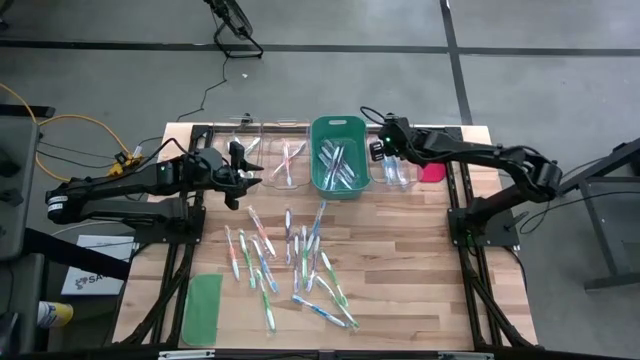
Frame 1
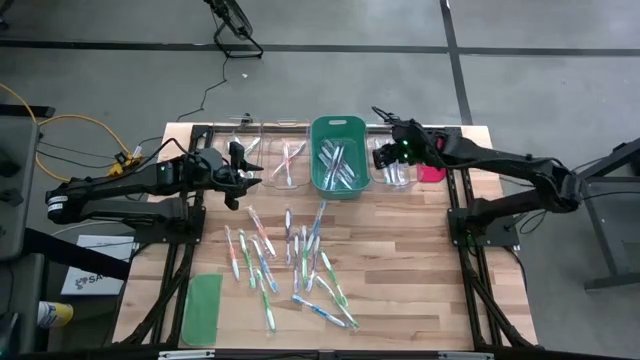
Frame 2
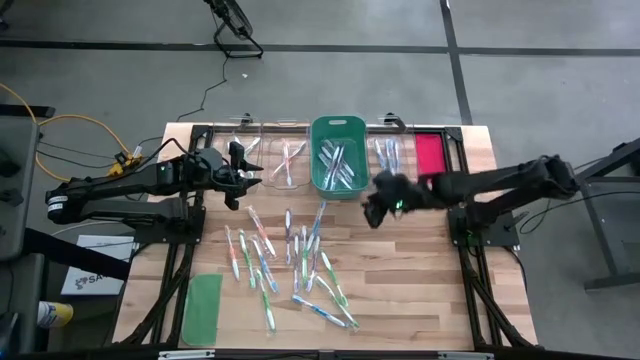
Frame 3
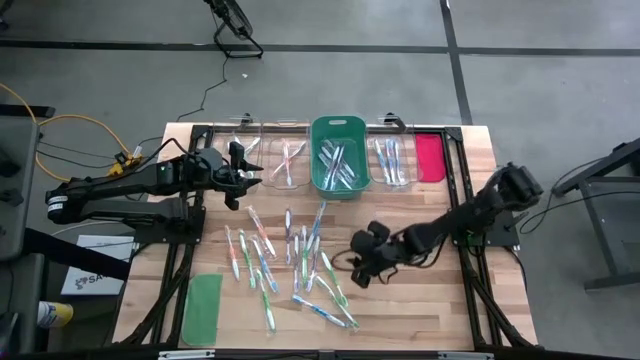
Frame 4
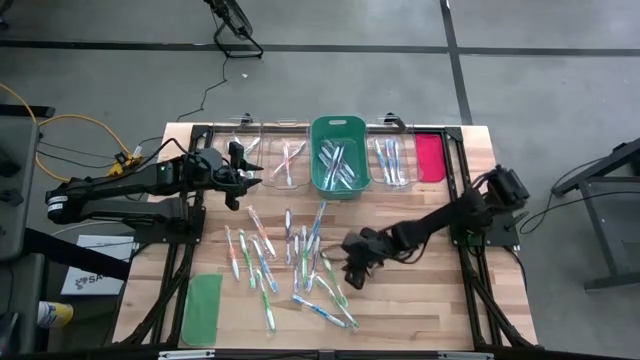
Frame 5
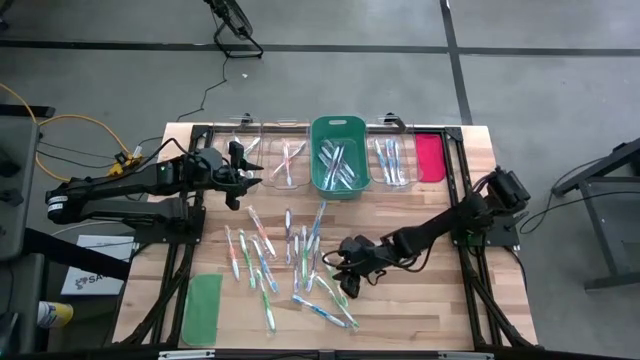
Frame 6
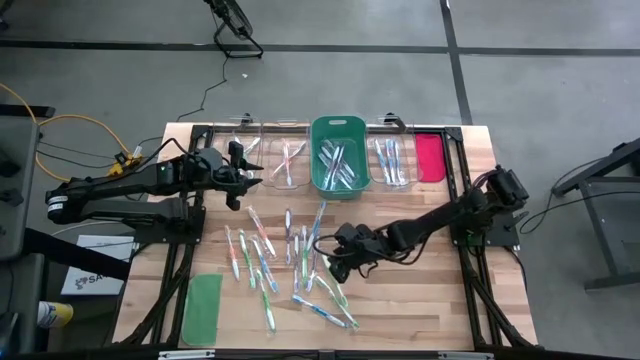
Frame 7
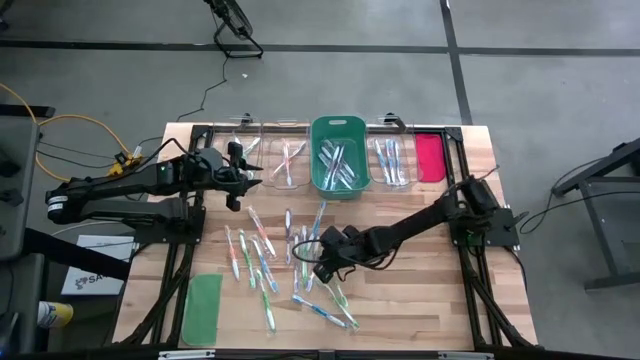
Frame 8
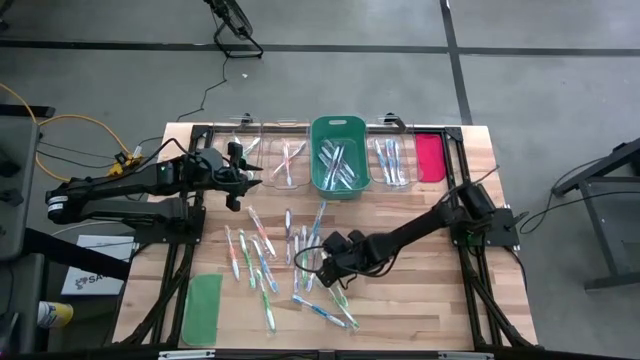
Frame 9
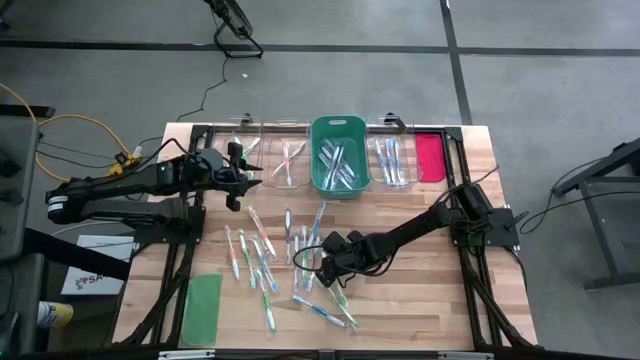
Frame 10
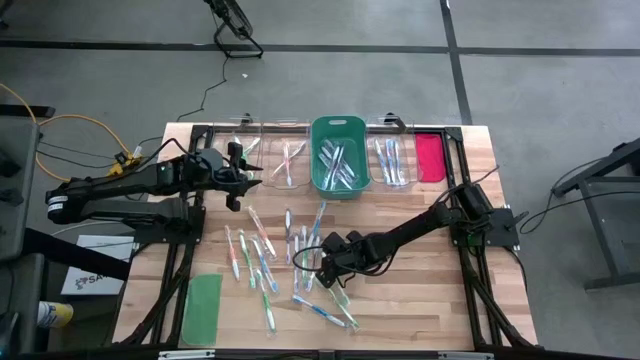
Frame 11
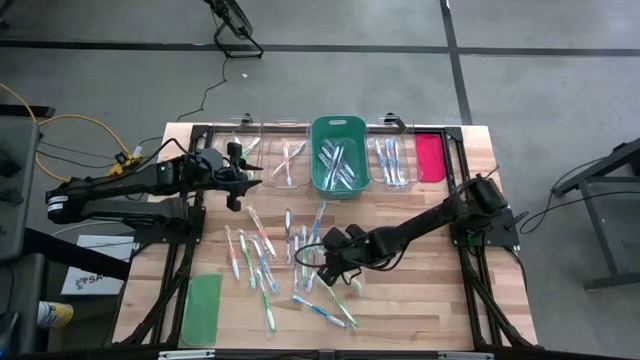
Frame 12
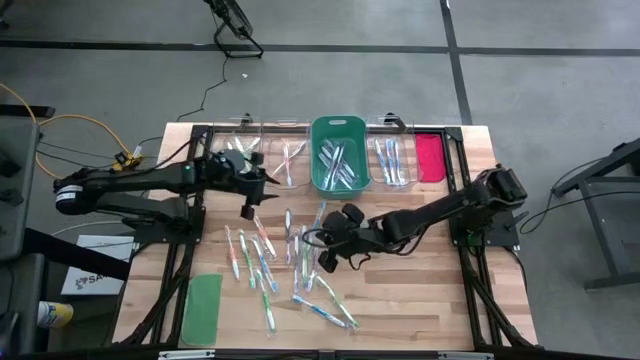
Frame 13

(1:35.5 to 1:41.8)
Task: Pick & Place Toothbrushes
Put the green toothbrush into the left transparent bin

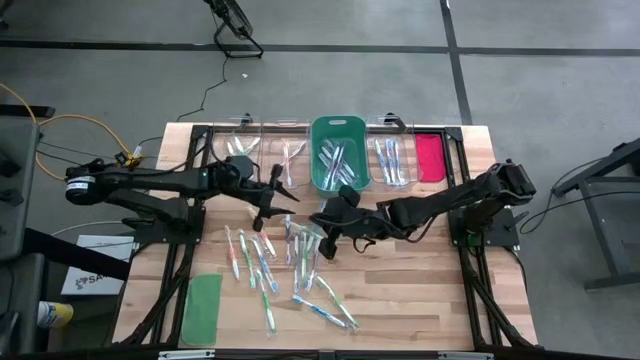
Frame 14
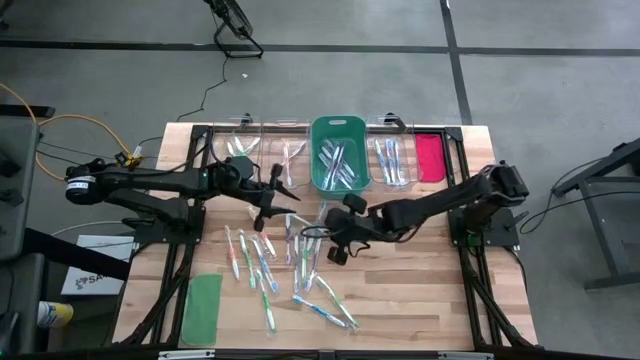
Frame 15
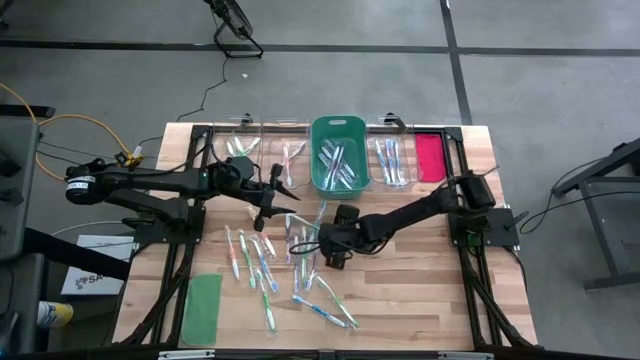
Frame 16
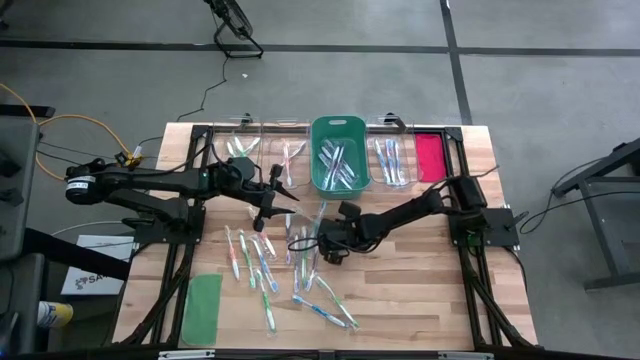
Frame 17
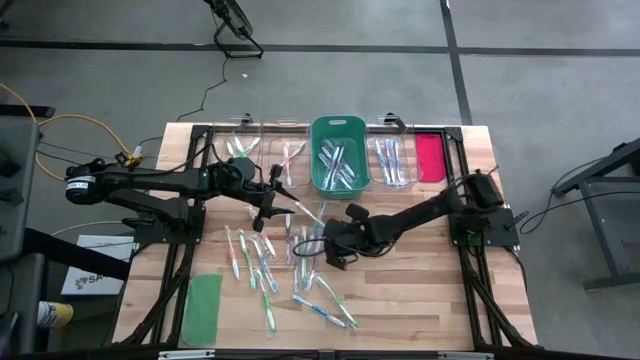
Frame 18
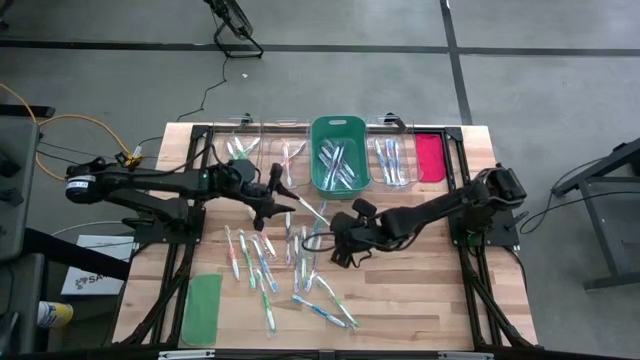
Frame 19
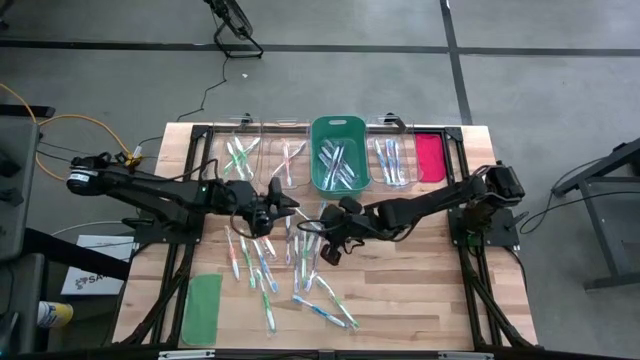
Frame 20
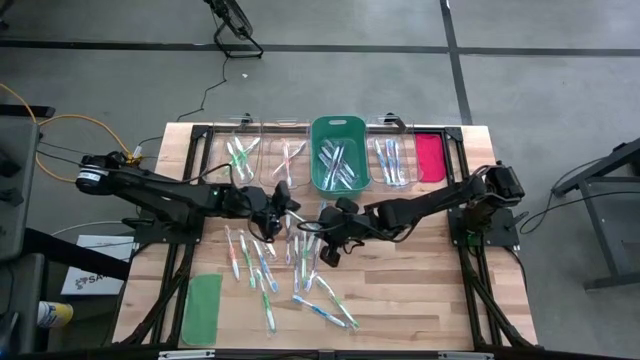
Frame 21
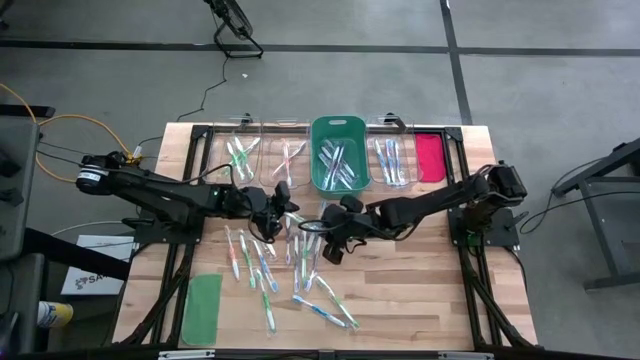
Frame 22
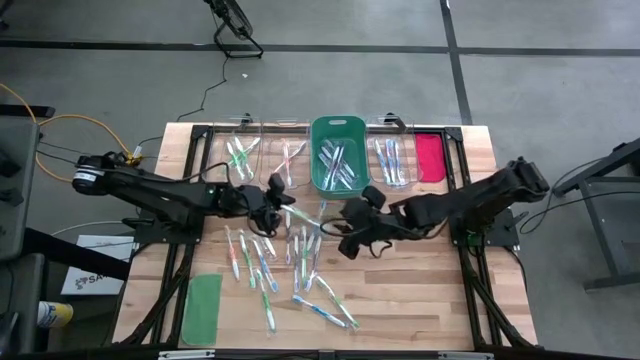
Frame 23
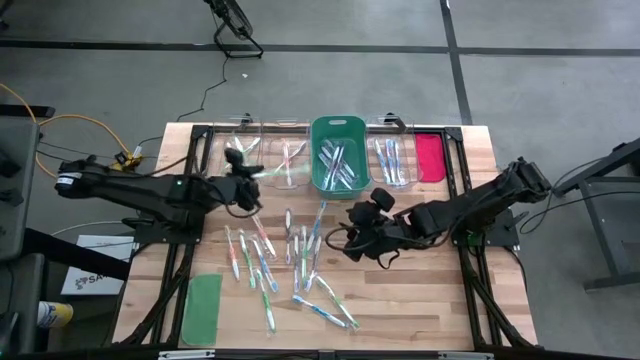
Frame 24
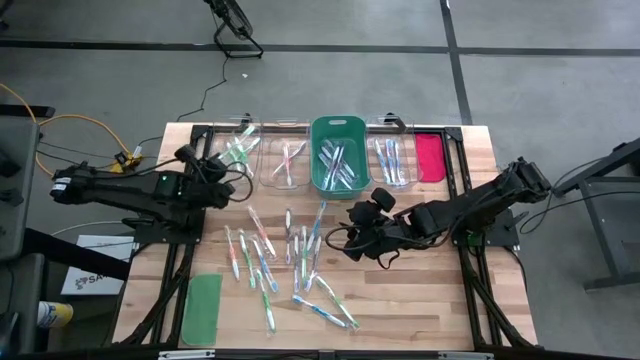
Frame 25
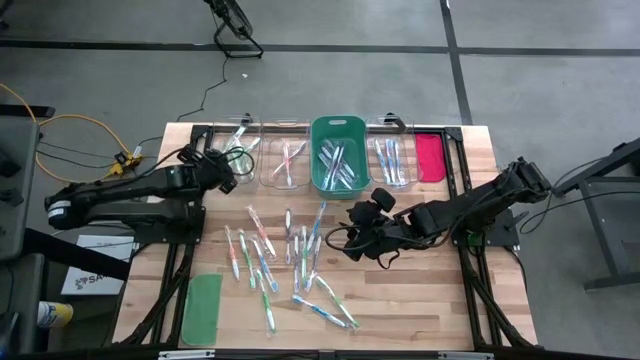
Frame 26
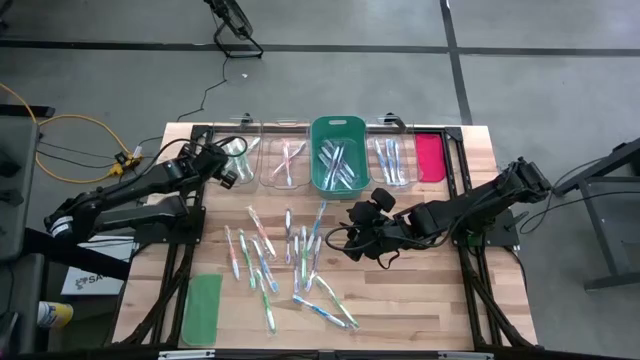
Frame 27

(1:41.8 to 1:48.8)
Put the green toothbrush into the left transparent bin

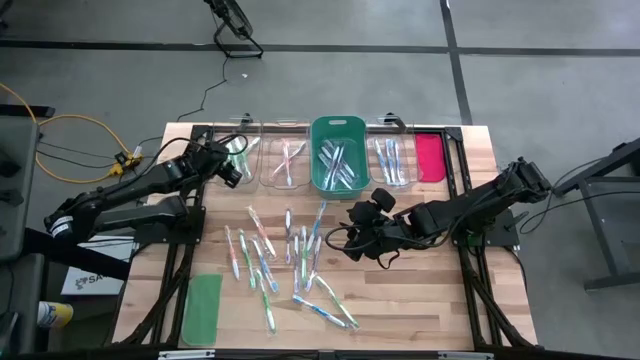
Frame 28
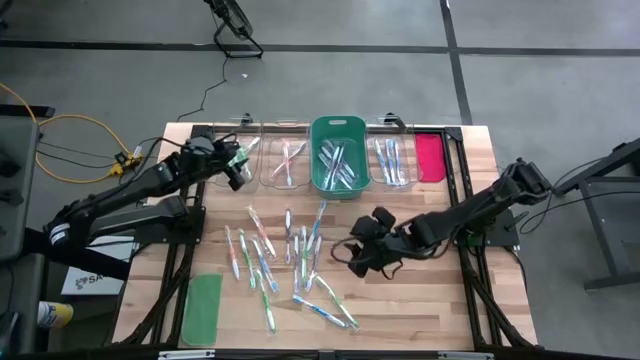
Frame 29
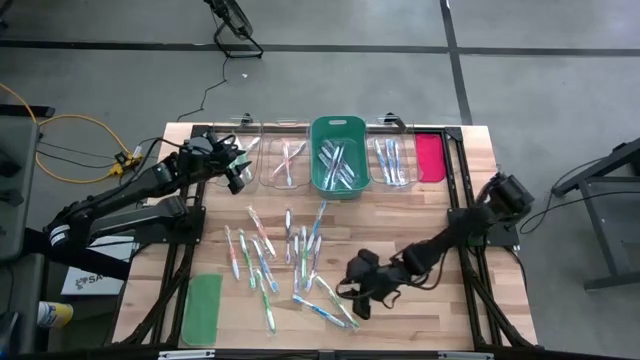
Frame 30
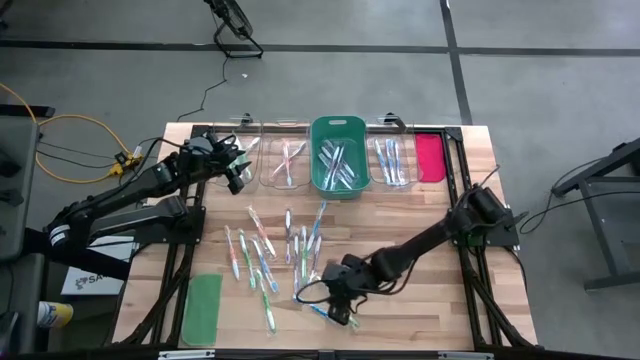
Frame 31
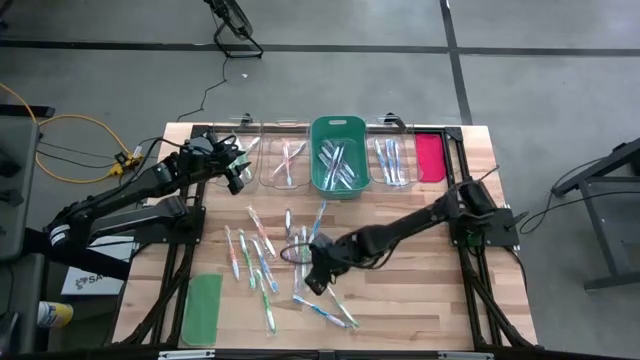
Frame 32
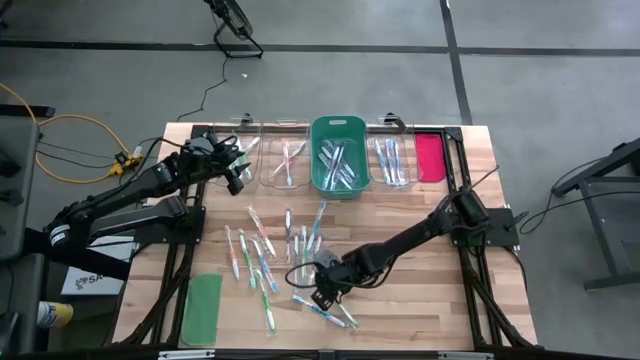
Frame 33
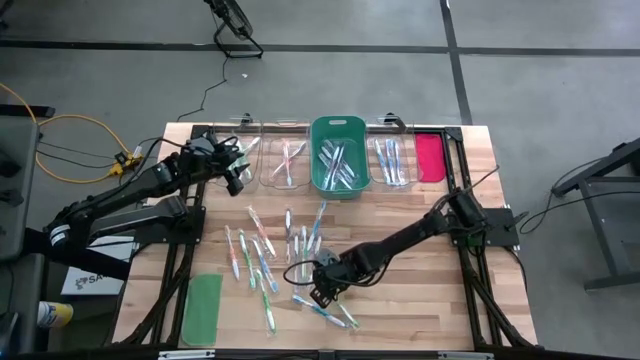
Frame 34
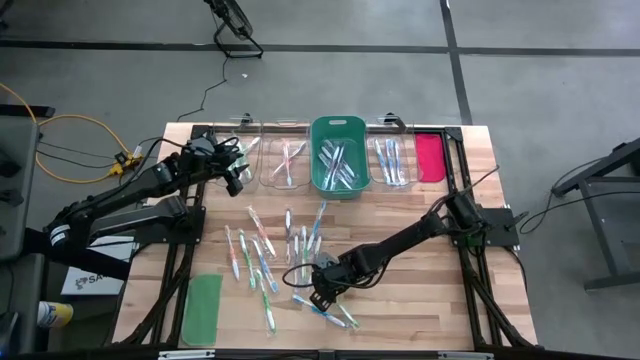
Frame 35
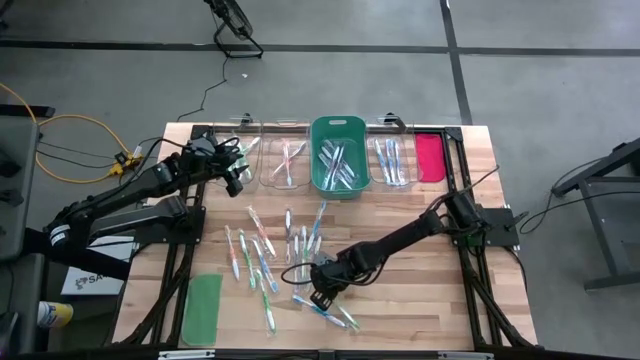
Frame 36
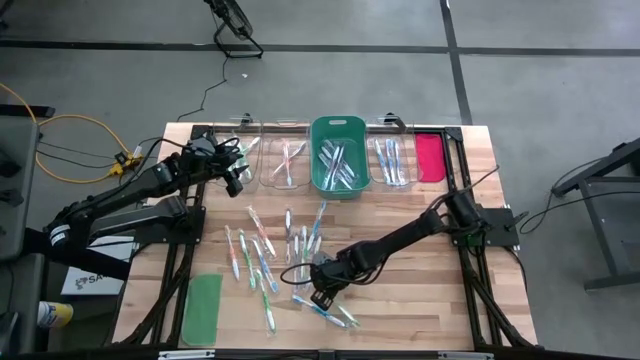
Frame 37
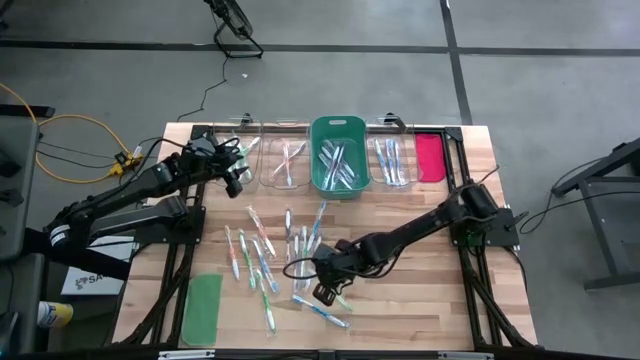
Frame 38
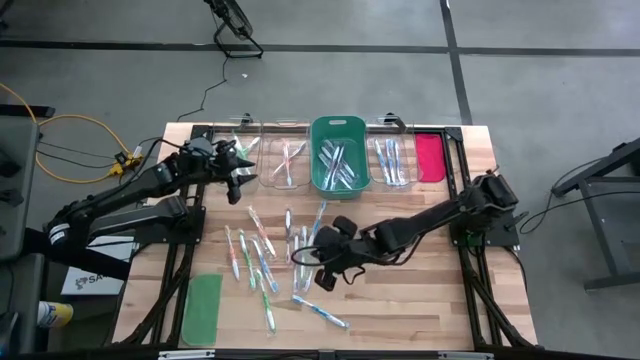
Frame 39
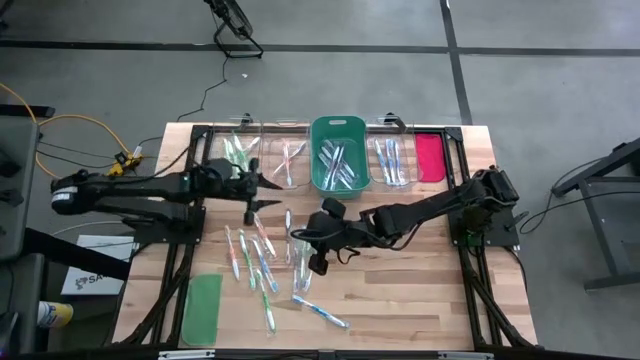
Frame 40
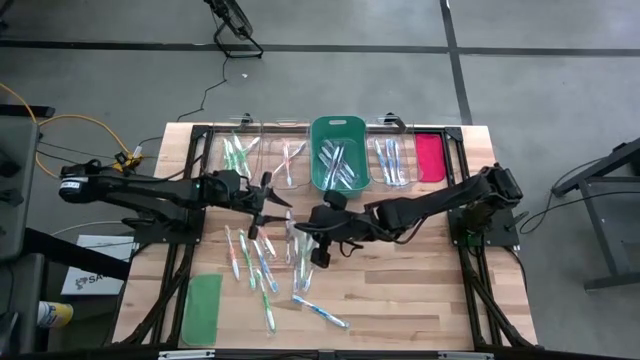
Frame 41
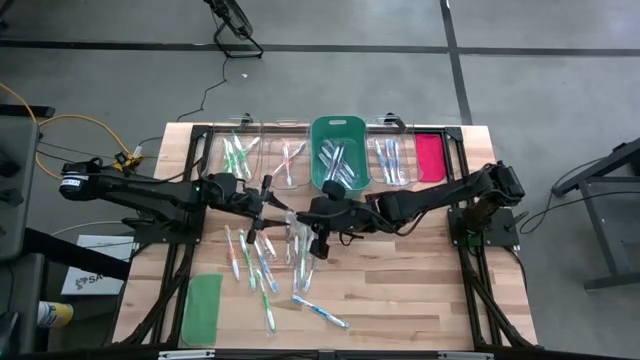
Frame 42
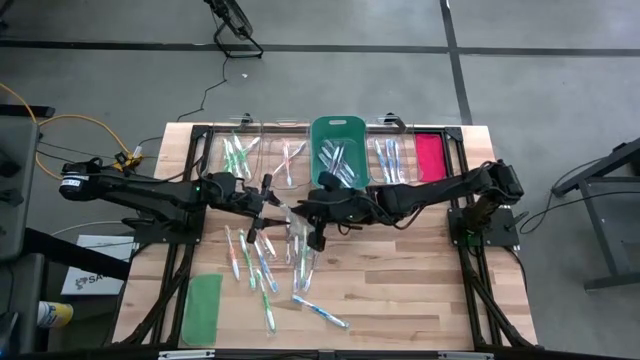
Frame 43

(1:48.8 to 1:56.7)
Put the green toothbrush into the left transparent bin
